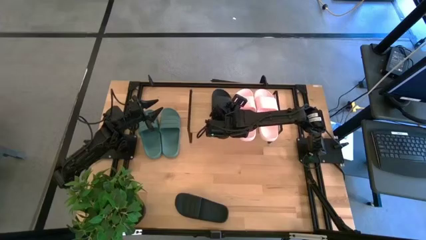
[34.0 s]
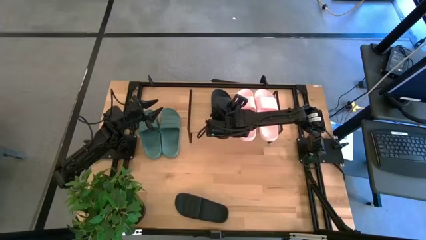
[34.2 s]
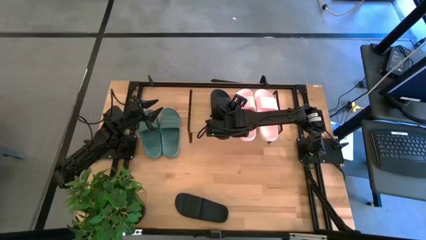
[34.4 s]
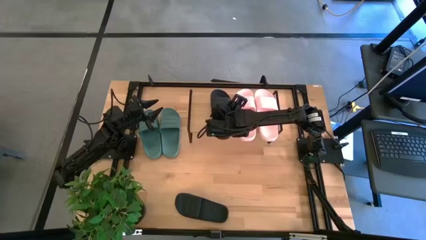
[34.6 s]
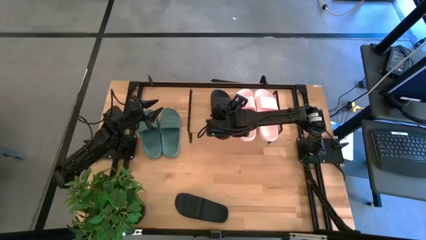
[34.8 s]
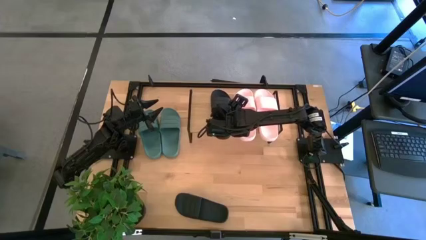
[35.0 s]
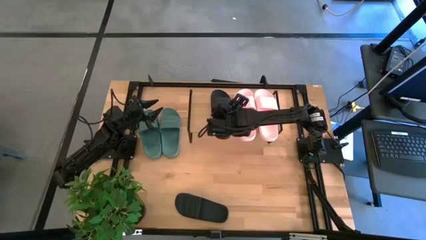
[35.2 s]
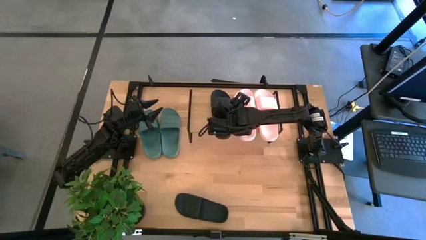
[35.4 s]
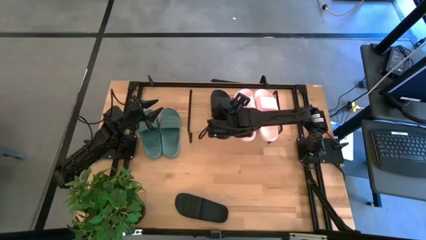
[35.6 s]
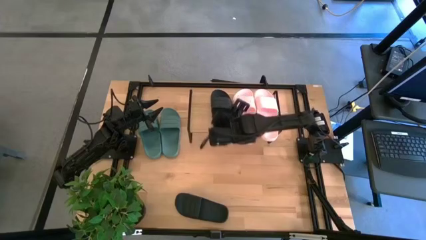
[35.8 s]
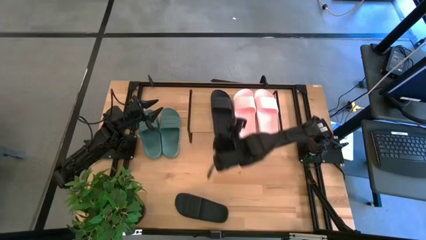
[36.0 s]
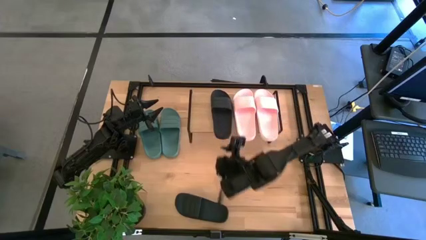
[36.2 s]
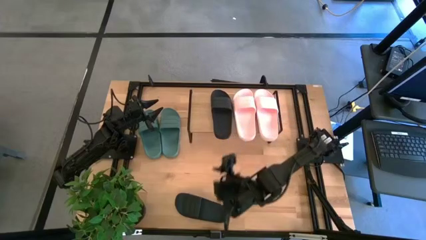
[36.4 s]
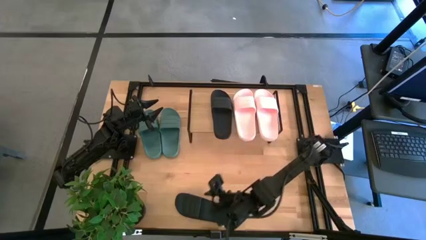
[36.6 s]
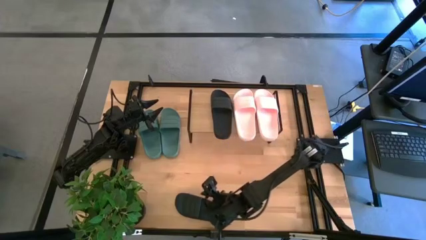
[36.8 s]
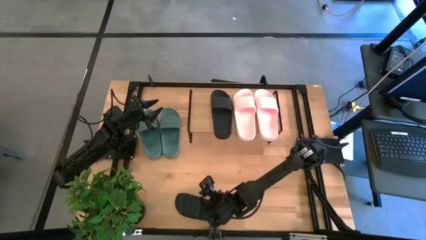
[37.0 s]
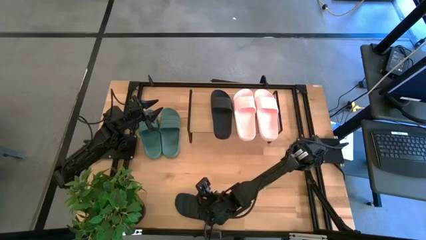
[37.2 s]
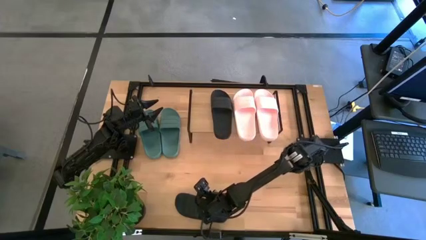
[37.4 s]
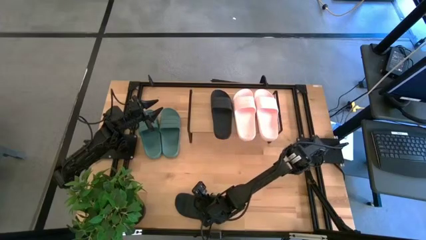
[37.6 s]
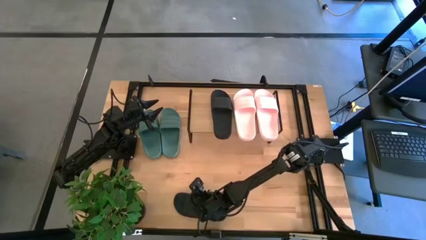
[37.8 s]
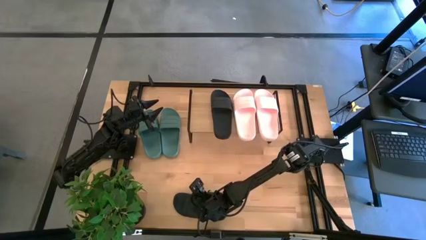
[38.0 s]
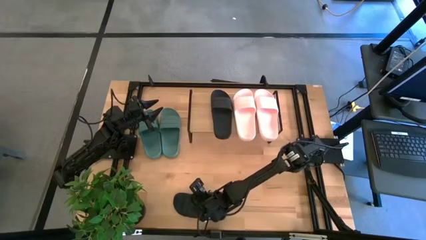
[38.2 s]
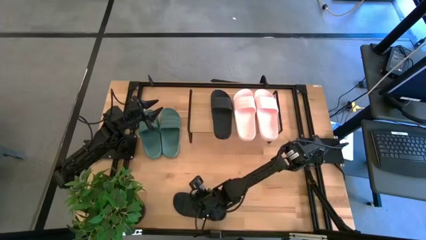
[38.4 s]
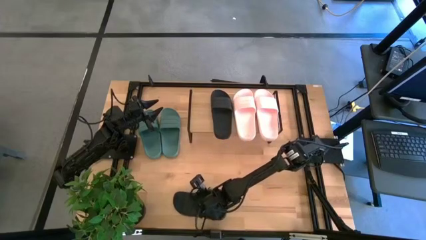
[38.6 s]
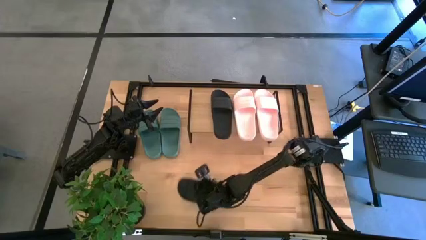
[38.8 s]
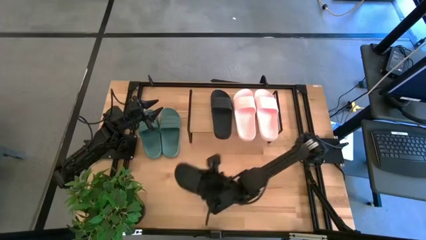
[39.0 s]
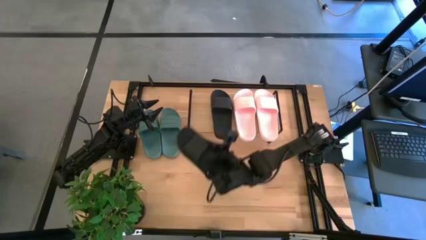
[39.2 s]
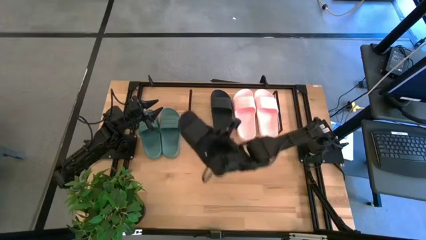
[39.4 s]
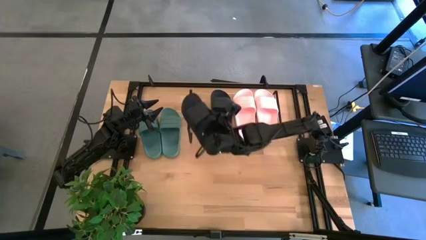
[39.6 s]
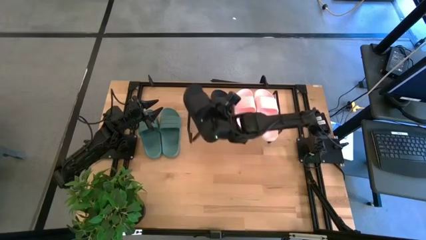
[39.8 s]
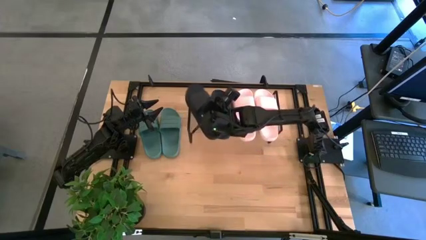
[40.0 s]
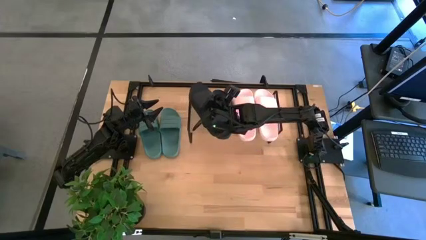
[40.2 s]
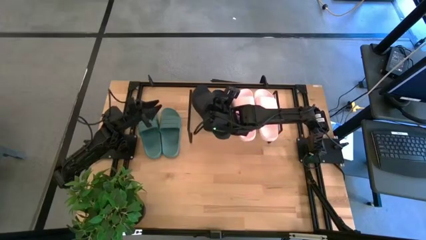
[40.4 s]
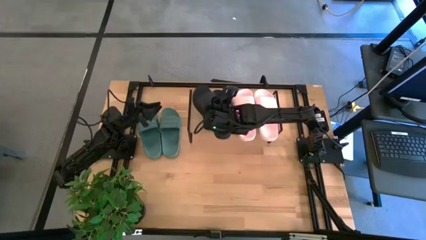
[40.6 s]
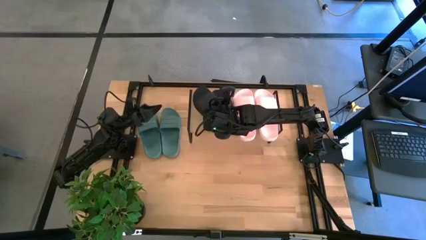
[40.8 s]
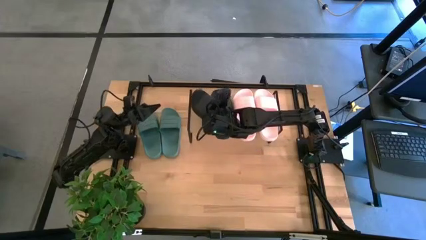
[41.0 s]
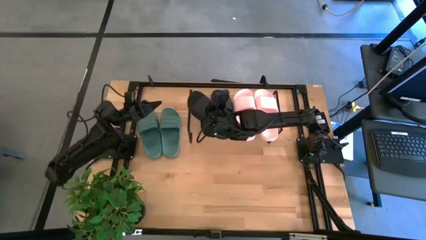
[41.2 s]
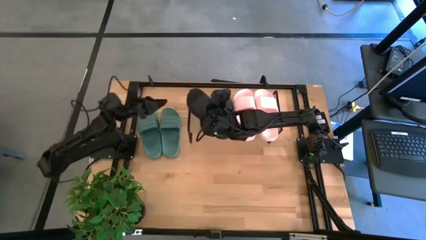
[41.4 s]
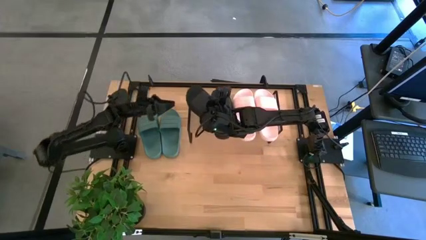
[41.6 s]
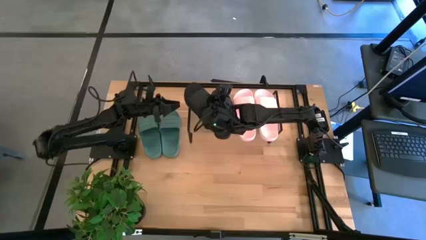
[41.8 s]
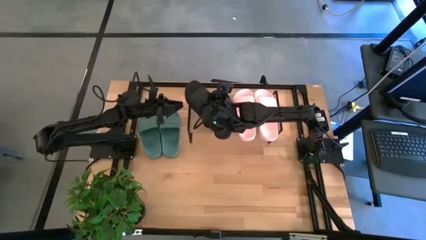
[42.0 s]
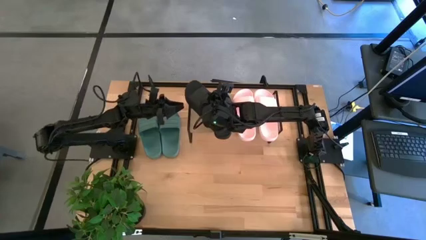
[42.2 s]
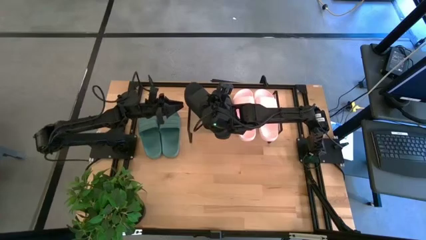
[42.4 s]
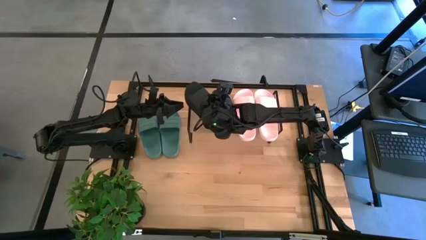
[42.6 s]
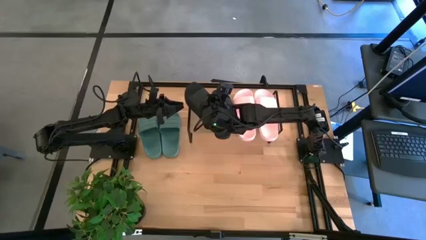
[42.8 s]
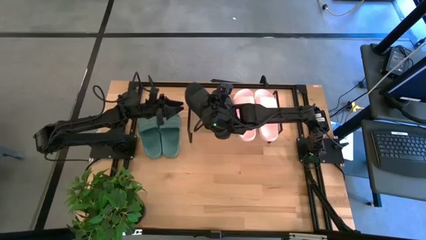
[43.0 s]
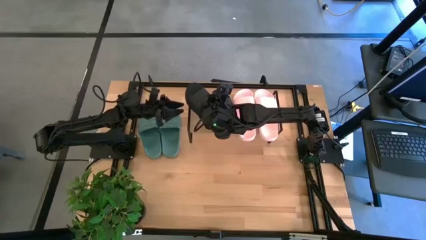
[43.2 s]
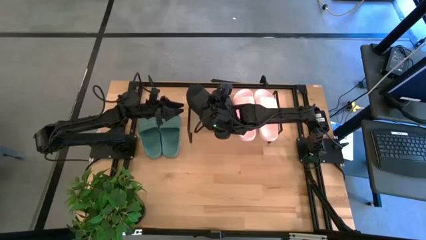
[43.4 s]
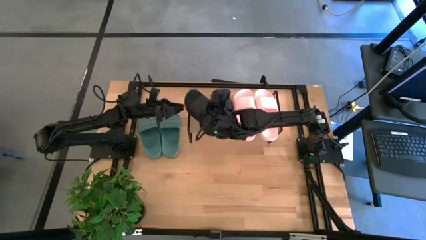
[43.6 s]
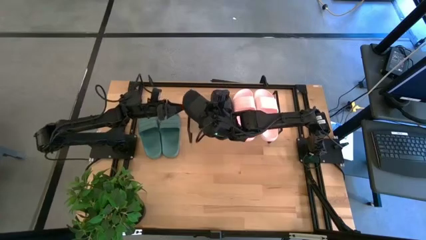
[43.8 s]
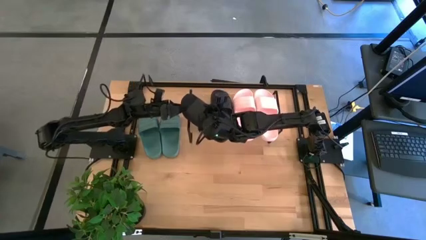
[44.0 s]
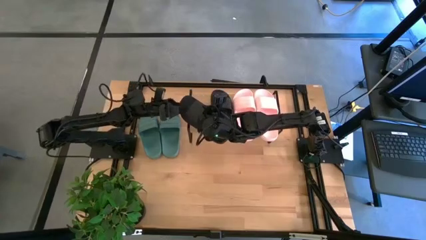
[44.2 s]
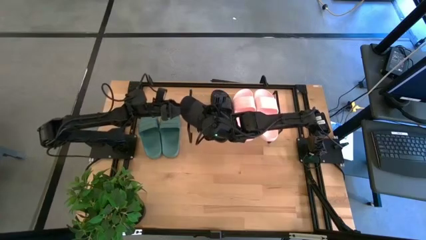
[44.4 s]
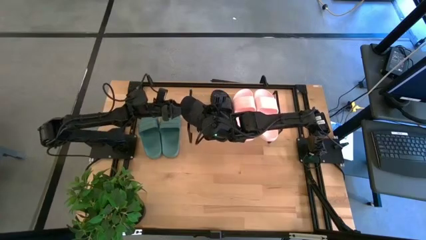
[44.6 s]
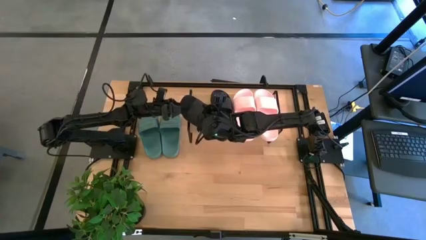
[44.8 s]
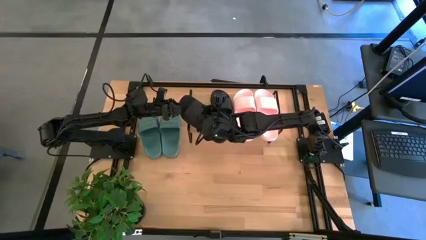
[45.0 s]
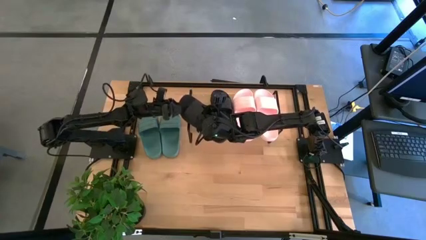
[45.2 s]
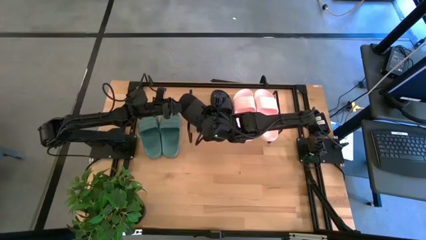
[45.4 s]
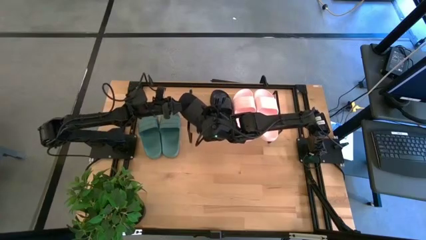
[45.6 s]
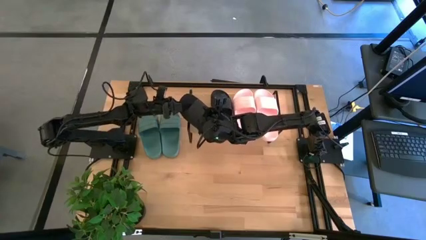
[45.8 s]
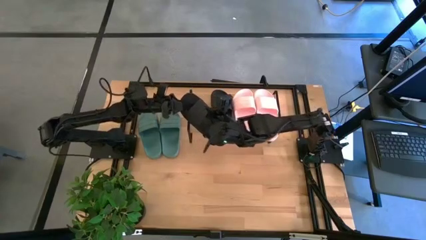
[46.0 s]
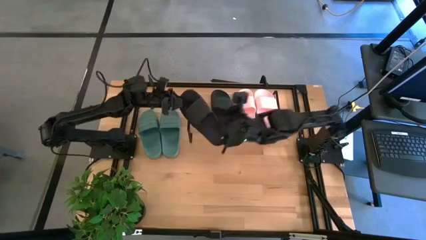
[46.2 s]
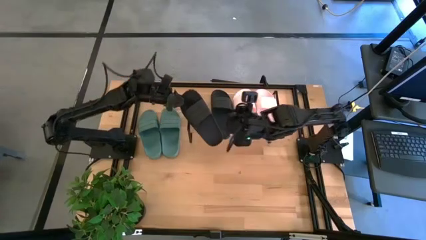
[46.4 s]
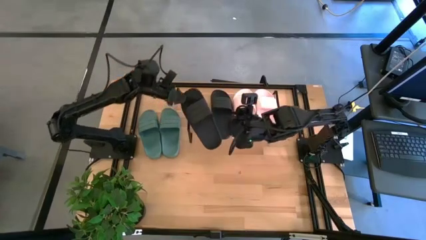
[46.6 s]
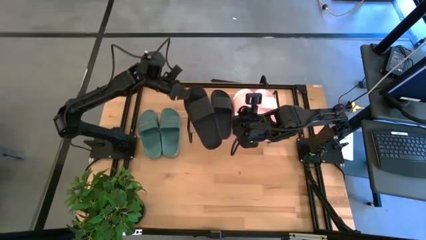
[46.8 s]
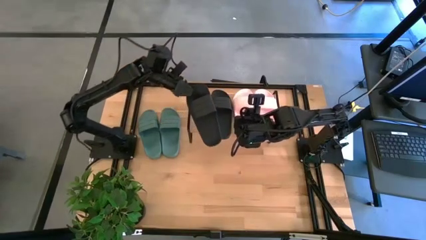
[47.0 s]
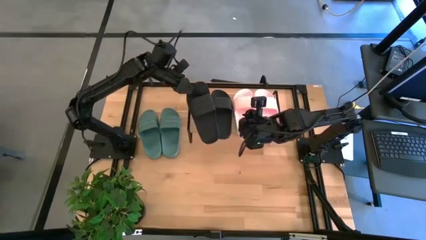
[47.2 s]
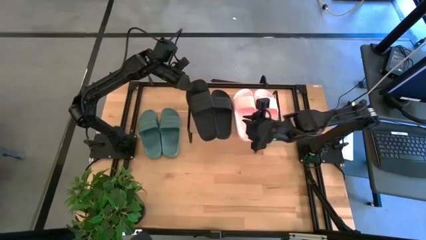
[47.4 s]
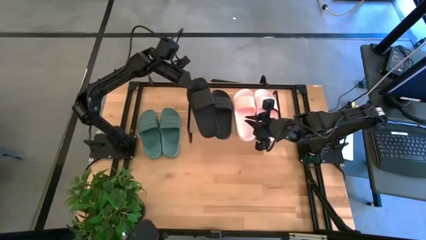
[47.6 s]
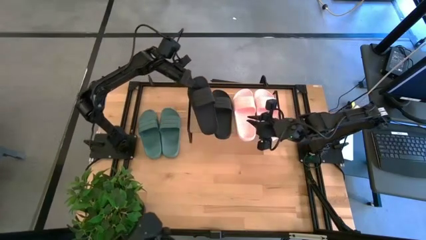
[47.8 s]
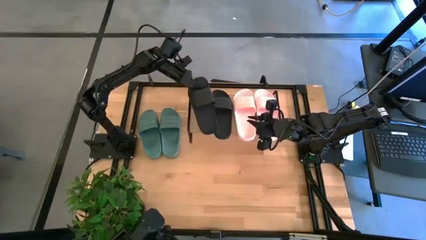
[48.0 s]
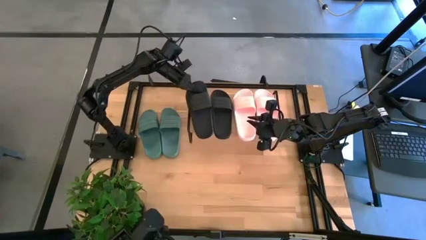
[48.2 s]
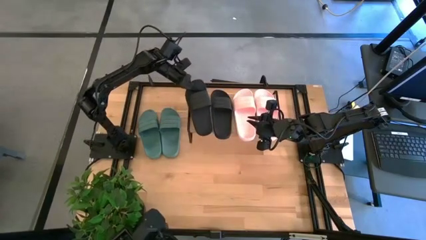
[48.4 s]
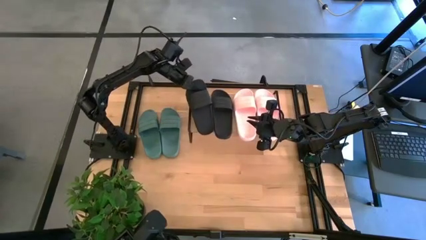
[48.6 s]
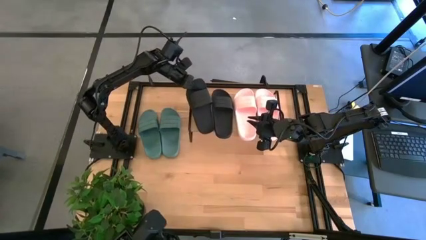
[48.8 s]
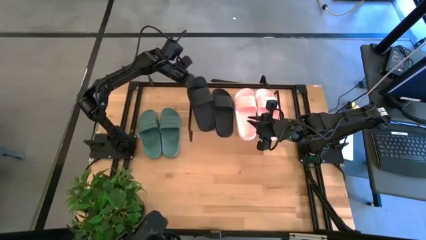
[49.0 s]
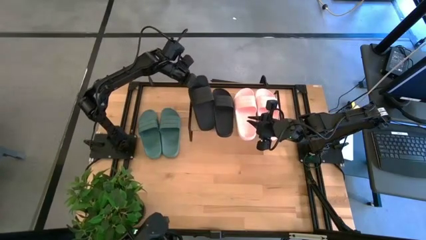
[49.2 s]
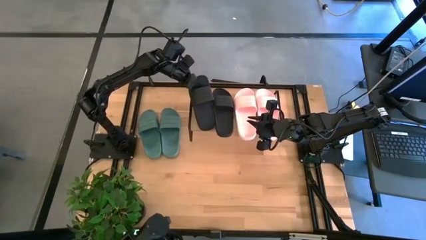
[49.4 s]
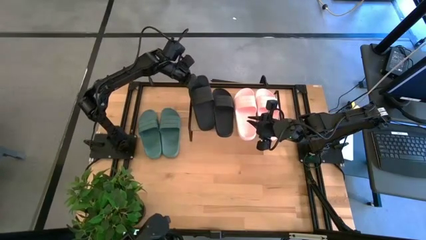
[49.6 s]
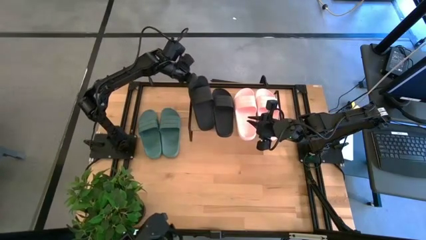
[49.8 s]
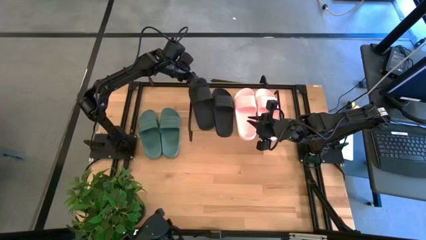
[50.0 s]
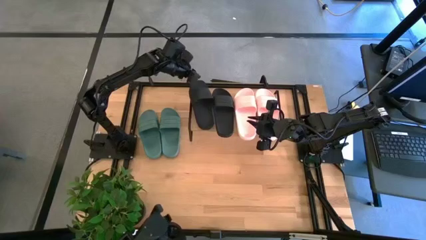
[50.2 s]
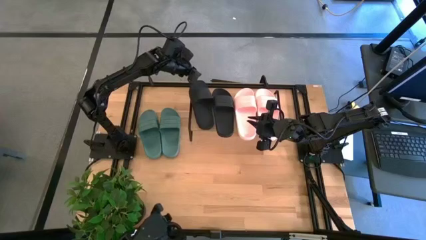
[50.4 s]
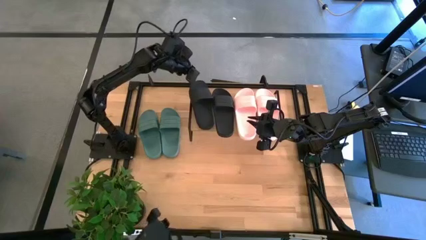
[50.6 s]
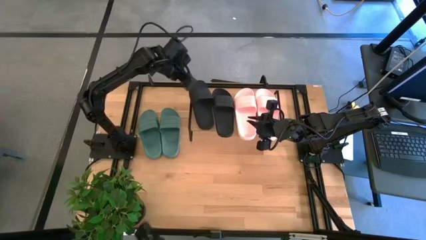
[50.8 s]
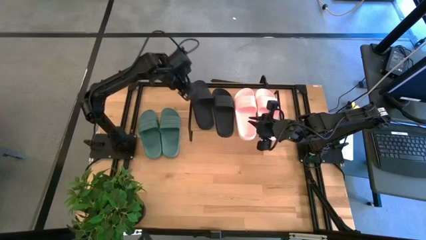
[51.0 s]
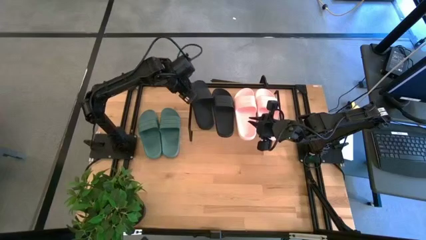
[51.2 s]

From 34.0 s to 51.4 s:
Task: Pick and place slides into the shelf
Put the black slide on the shelf
